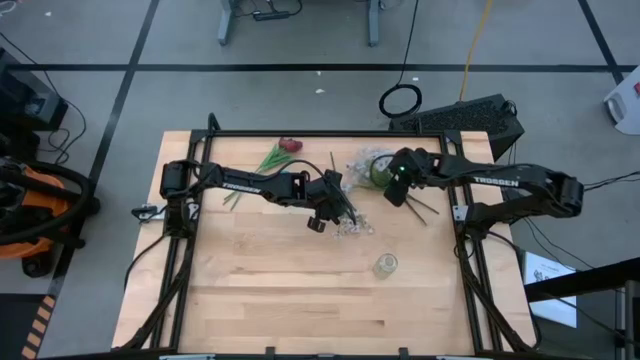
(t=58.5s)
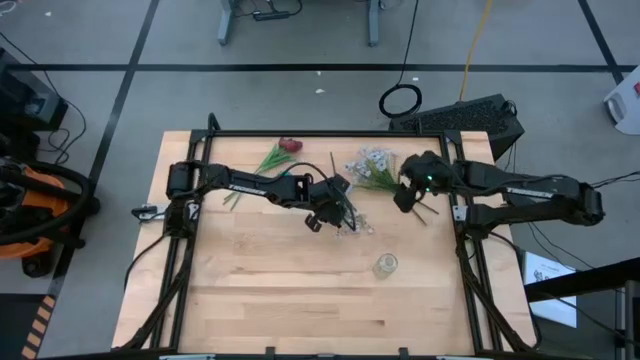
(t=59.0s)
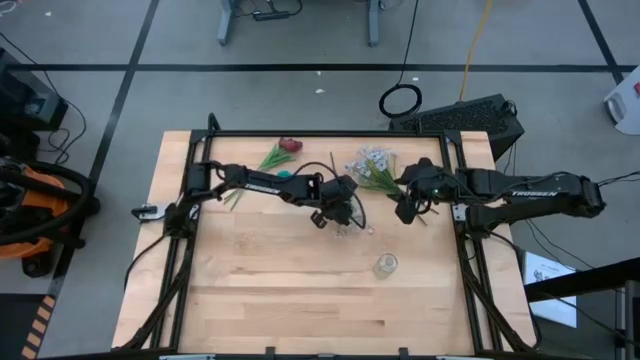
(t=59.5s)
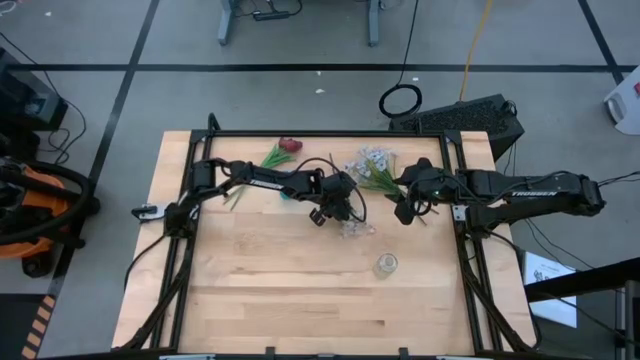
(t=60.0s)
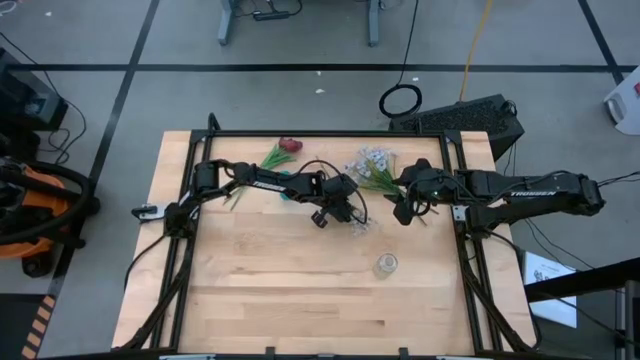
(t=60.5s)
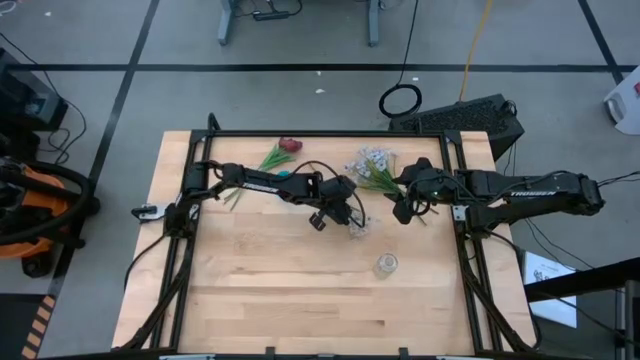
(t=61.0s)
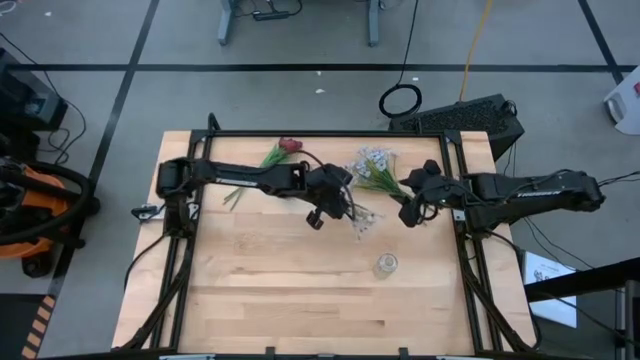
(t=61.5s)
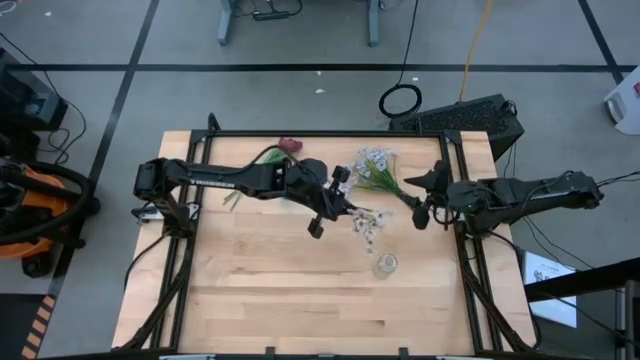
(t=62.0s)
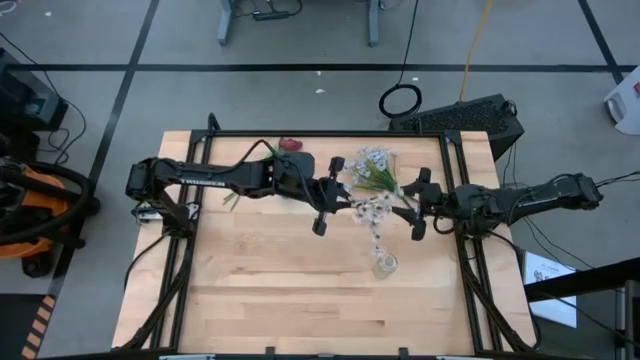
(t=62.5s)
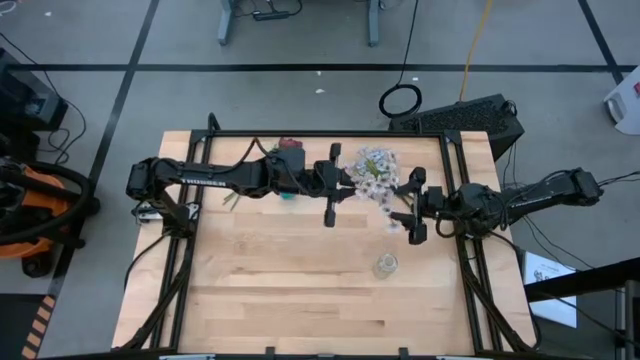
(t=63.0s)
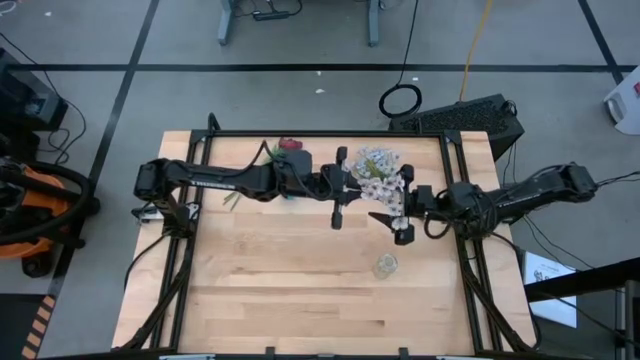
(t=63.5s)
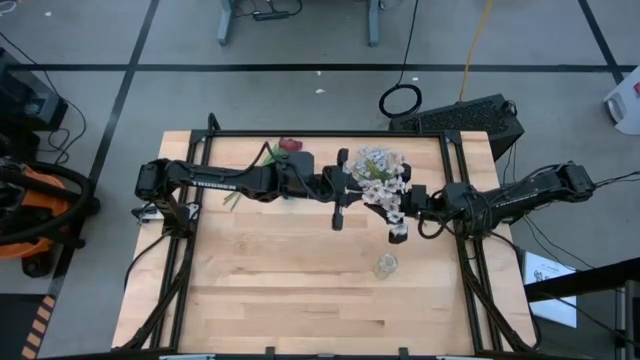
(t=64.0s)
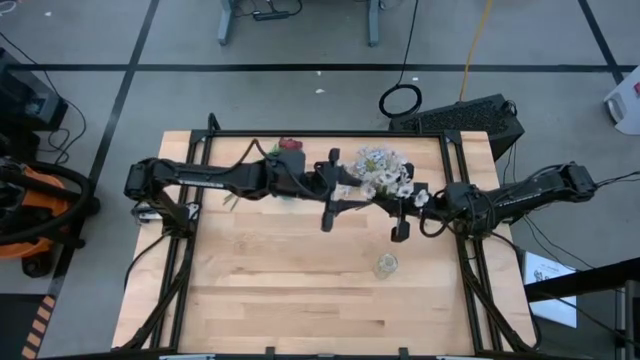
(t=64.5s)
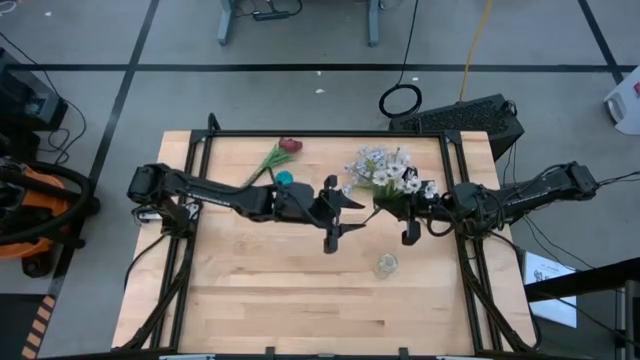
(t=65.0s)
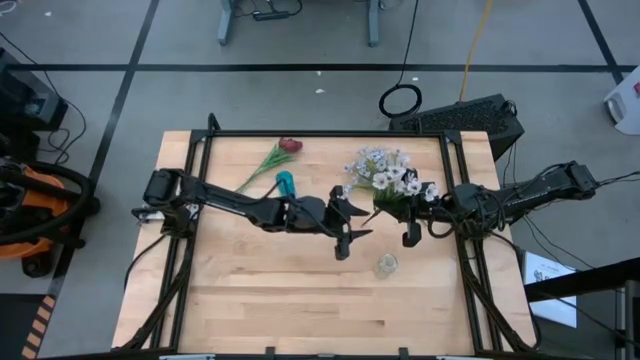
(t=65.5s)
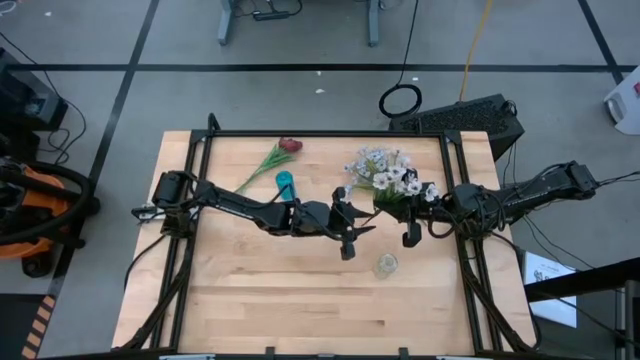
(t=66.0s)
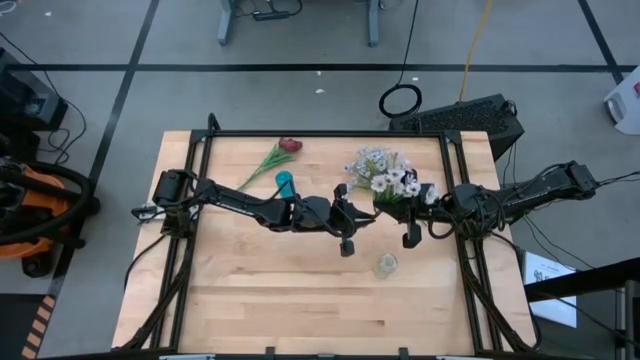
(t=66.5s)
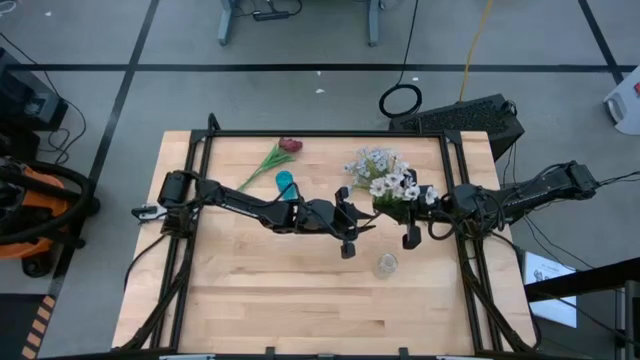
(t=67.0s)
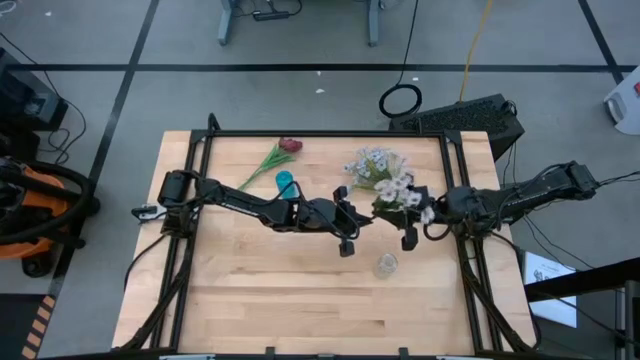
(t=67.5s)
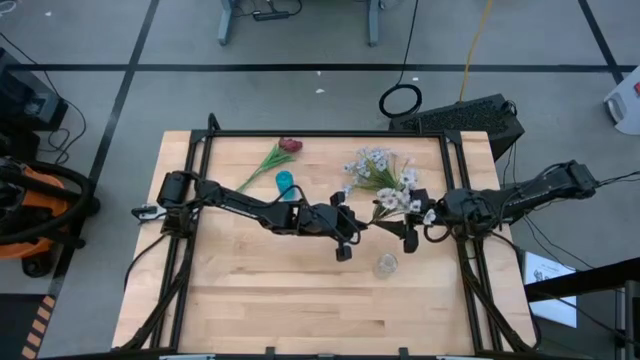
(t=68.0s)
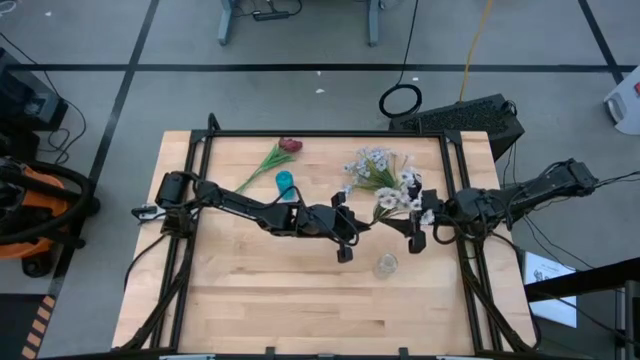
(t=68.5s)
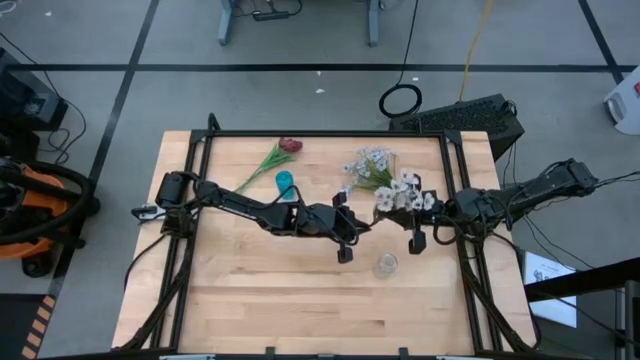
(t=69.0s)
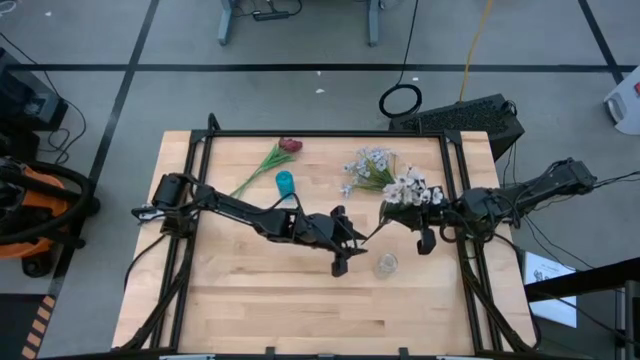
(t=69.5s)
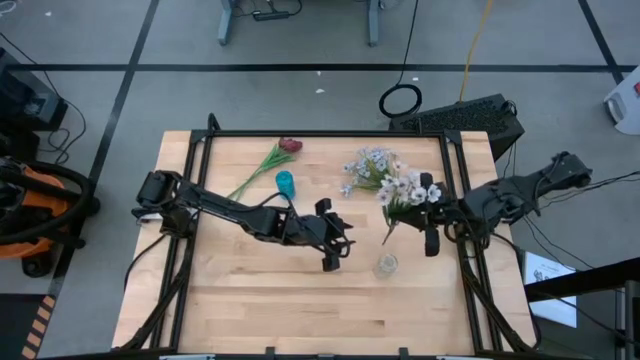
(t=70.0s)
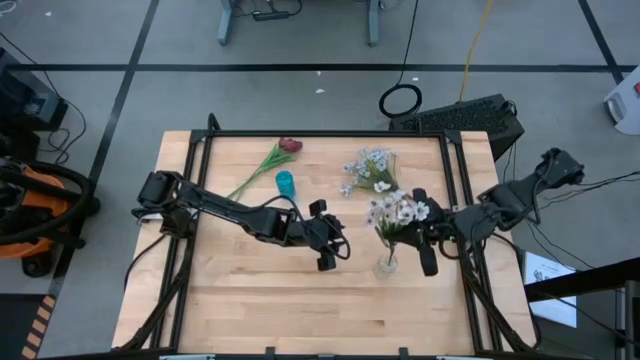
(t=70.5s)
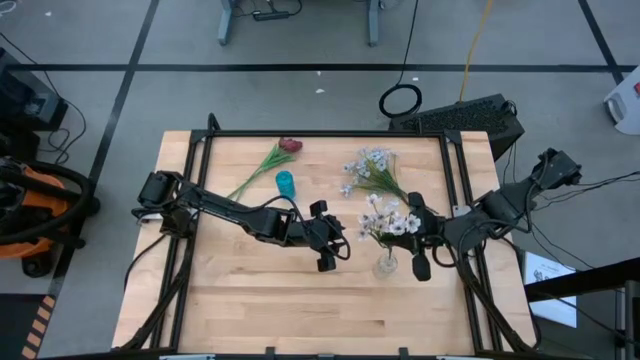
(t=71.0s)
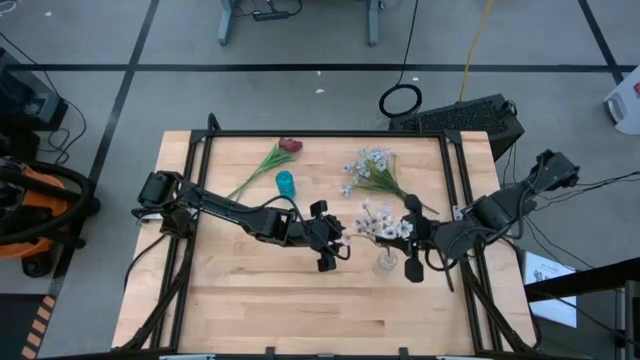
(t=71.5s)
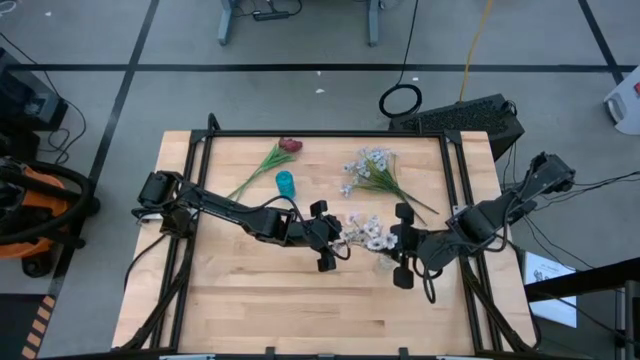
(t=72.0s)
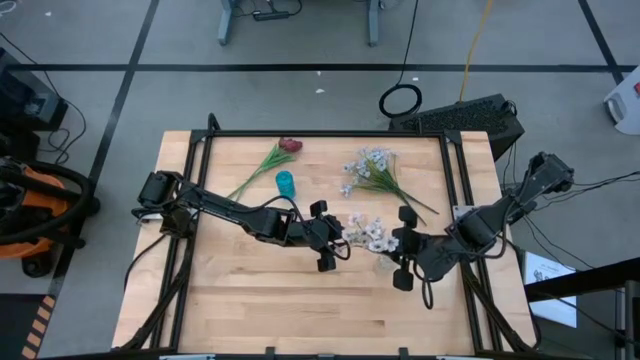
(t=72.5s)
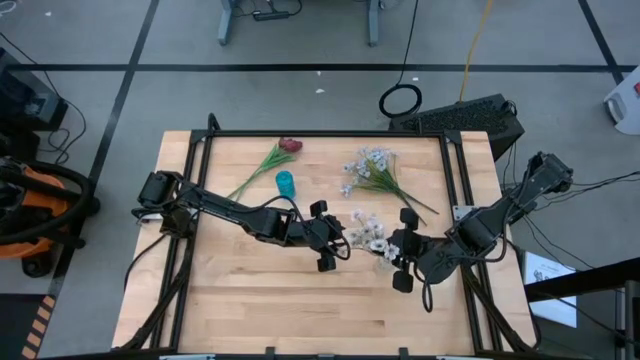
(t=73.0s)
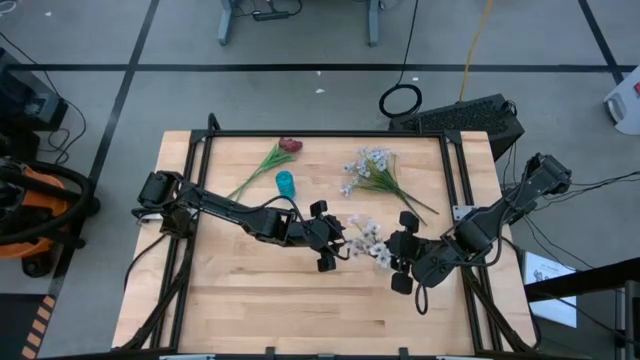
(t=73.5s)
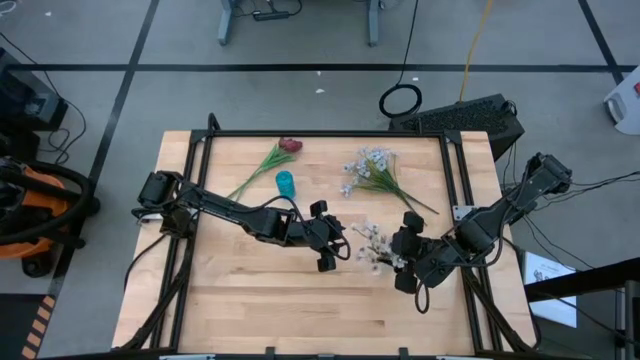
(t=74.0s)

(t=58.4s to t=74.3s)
Task: Sort flowers into vase by color
Put the white flowers into the transparent vase

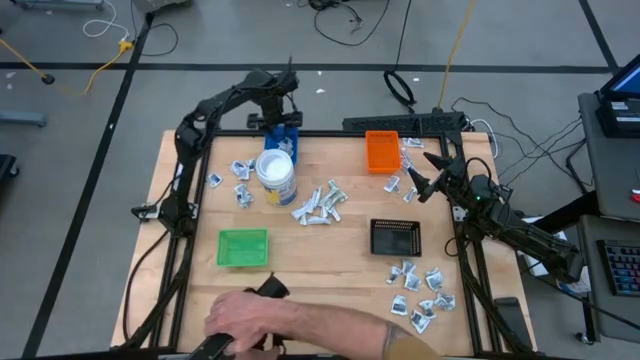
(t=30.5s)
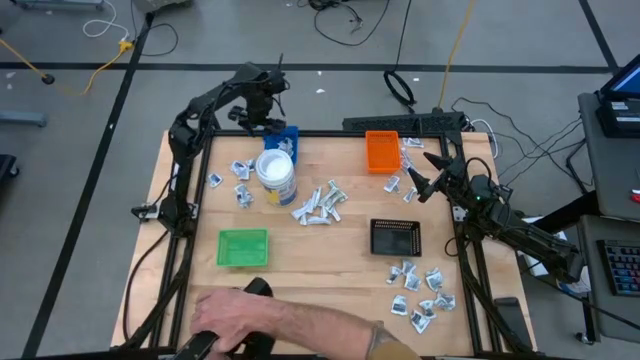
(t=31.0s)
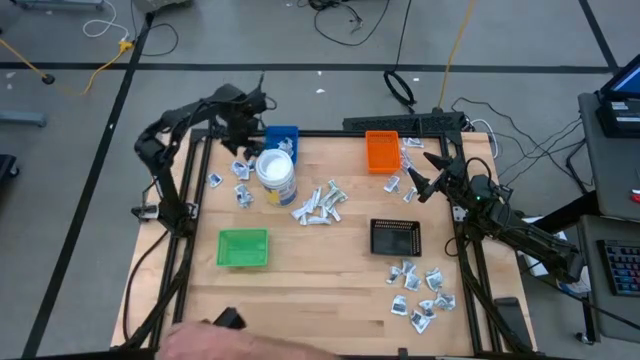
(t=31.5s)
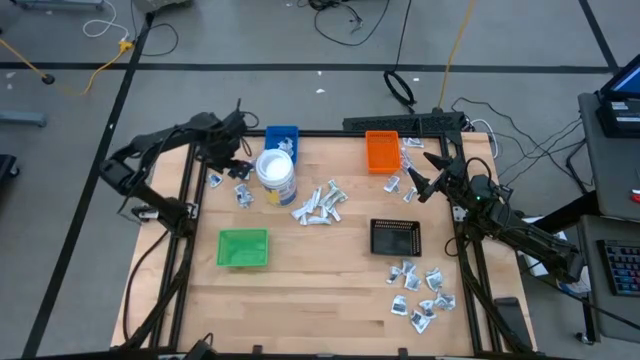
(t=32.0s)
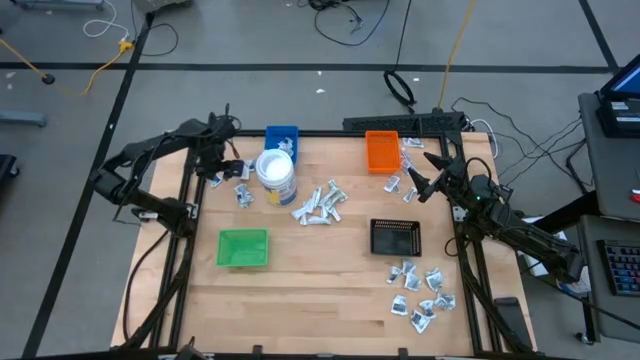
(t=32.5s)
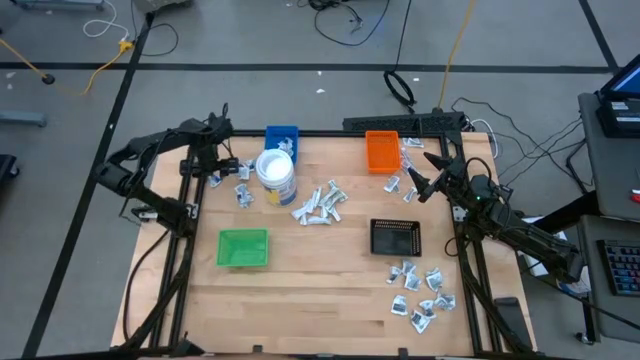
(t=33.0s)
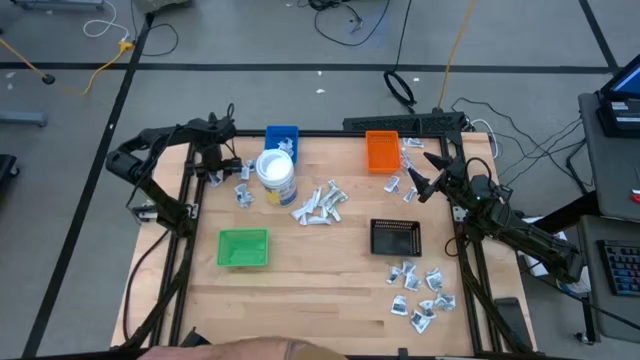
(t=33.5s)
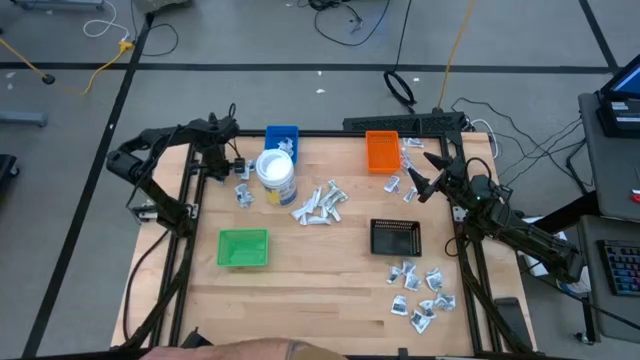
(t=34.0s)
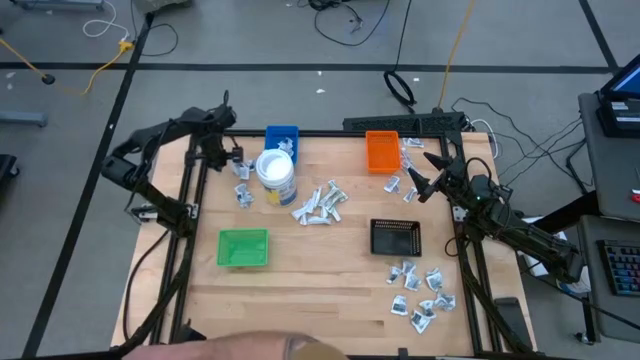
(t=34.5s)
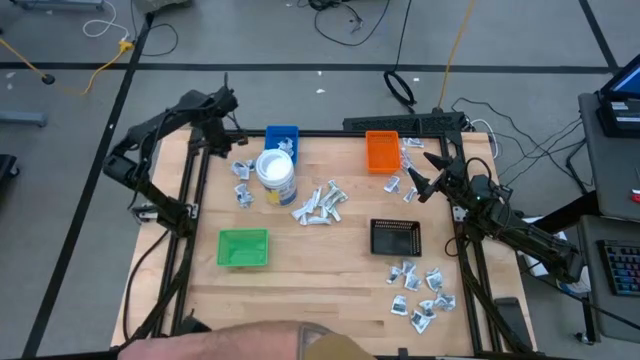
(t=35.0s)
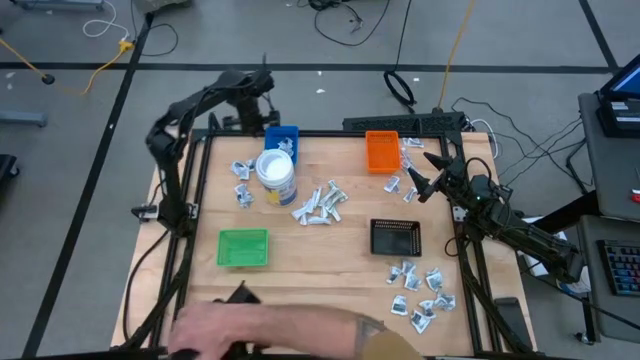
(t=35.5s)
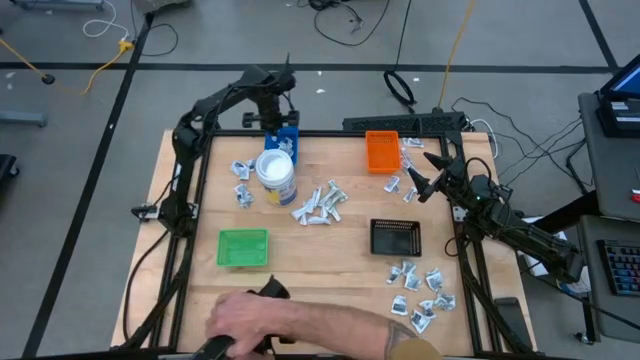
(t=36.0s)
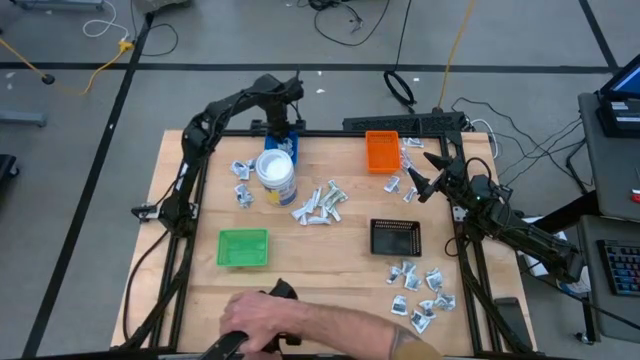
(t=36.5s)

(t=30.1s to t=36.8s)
Task: Pick & Place First Aid Supplies
Put the blue alcohol pad into the blue bin
